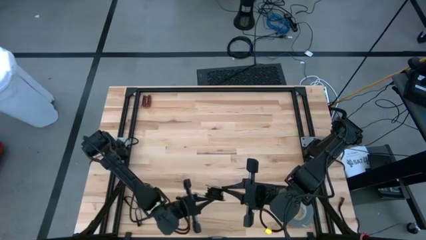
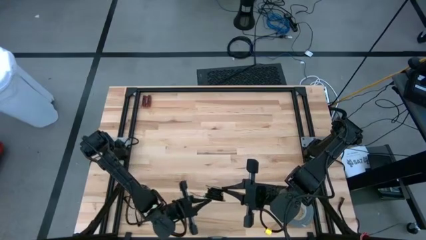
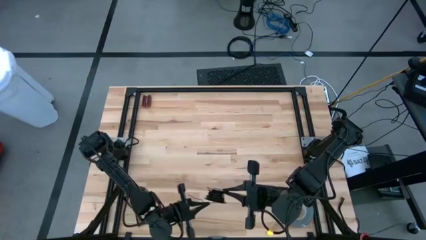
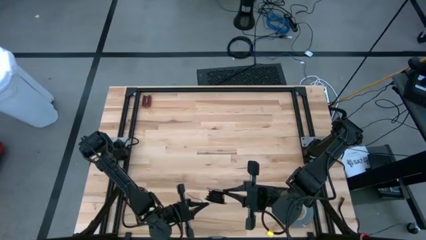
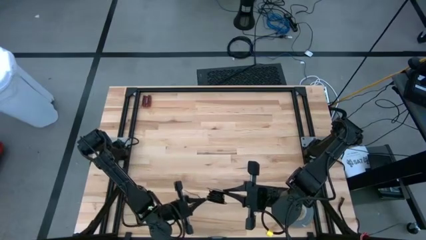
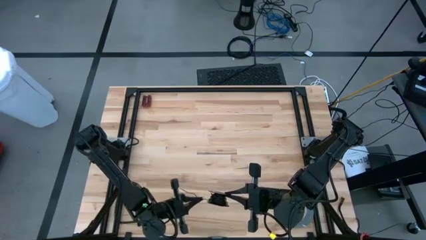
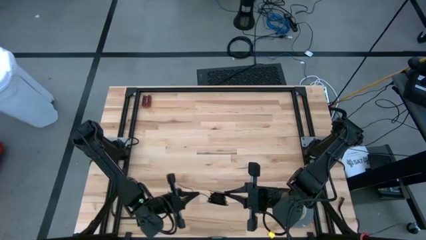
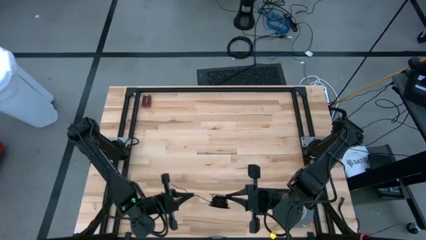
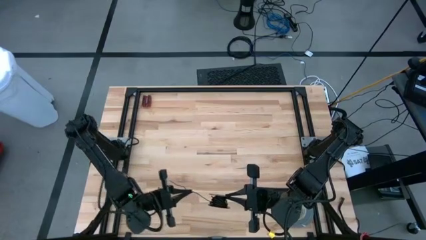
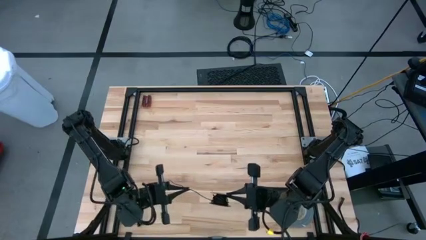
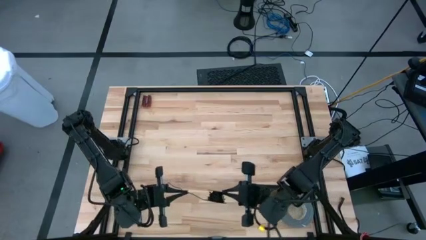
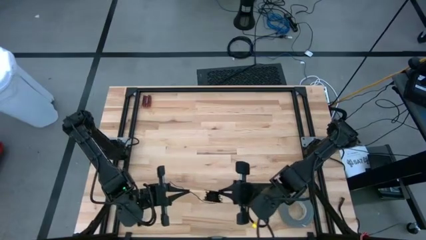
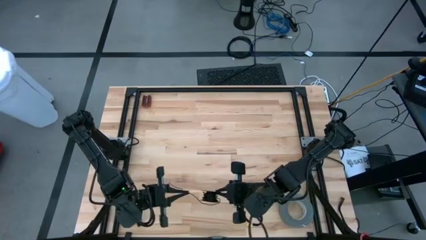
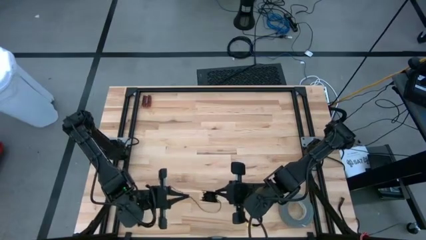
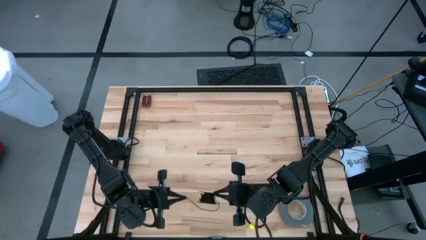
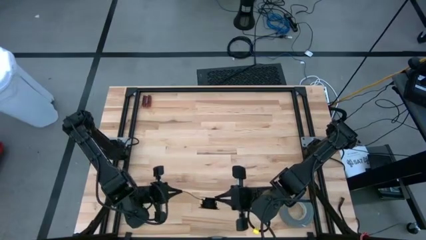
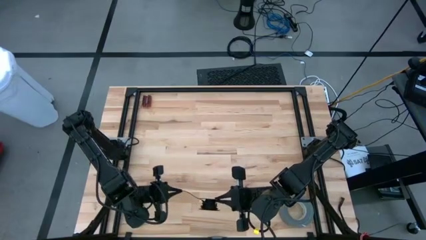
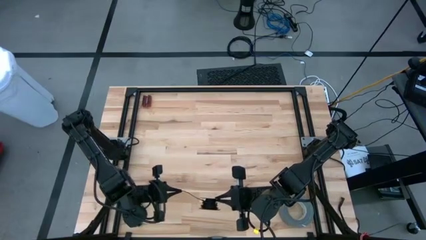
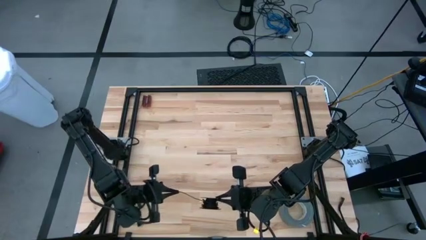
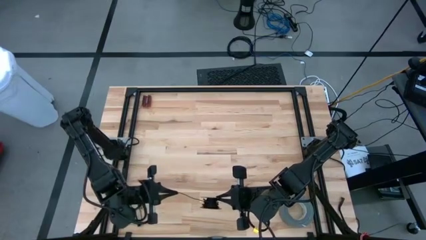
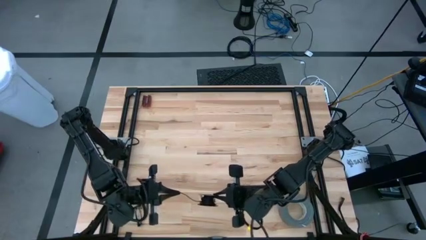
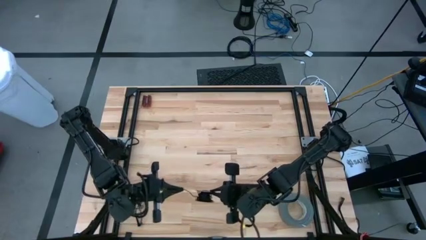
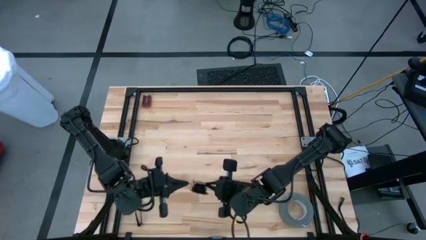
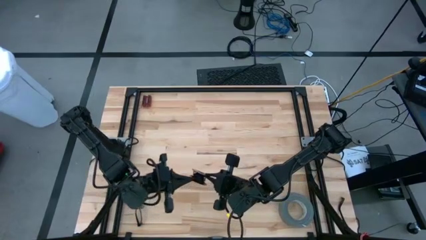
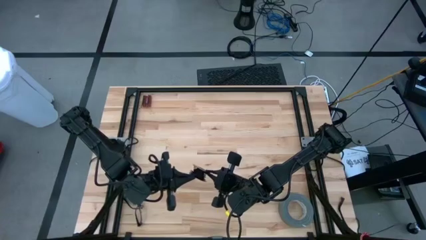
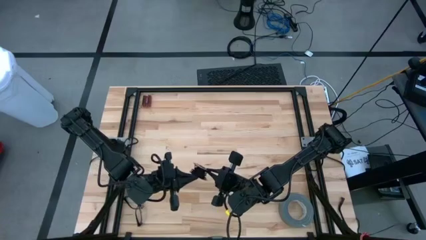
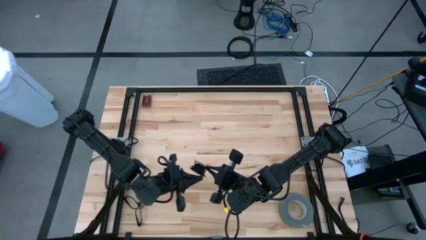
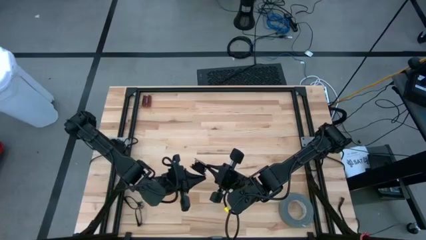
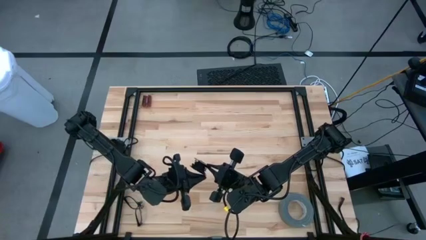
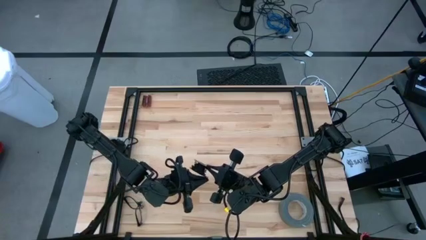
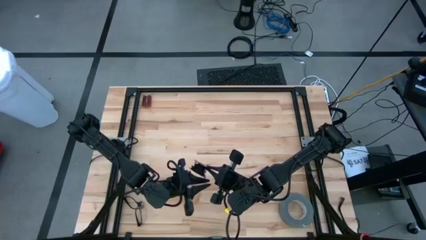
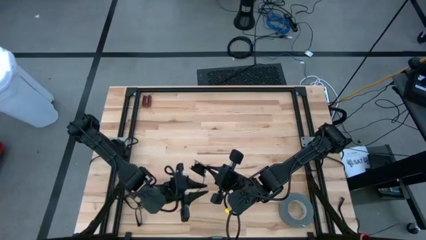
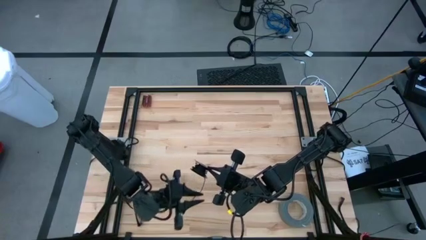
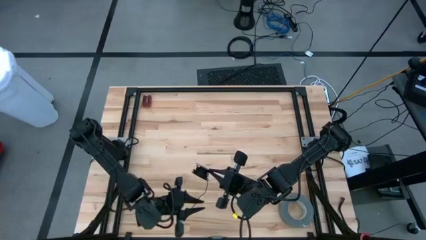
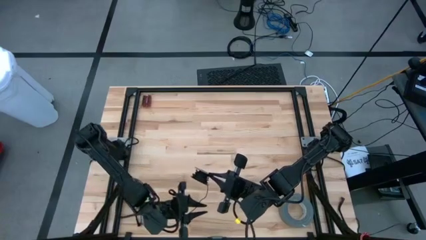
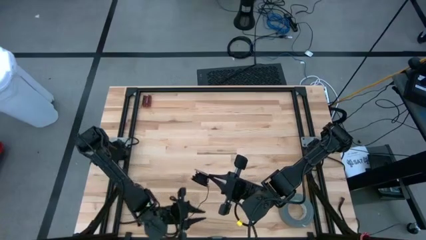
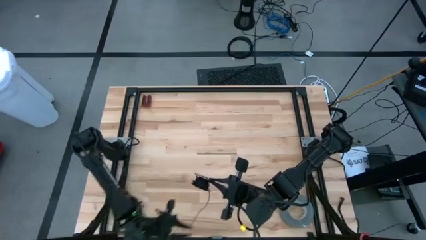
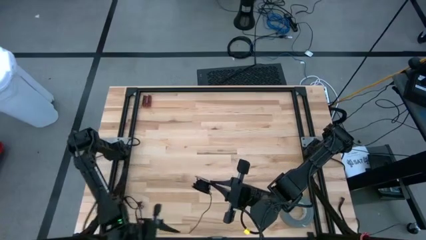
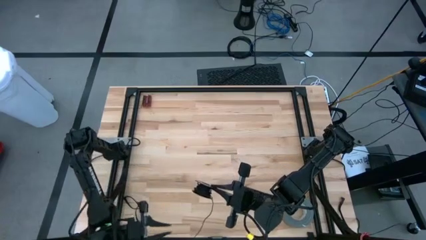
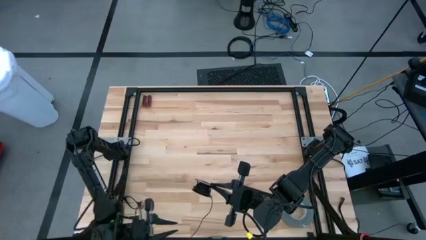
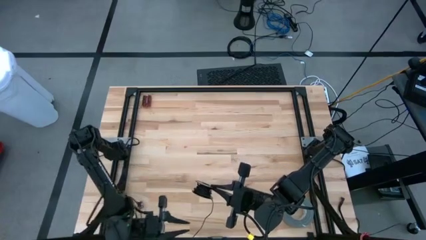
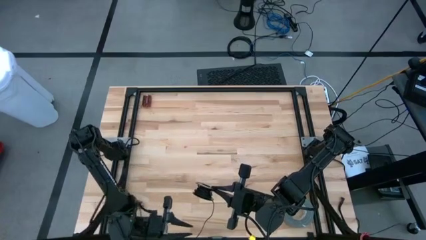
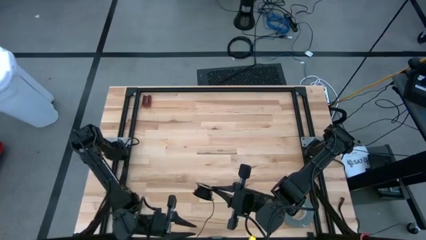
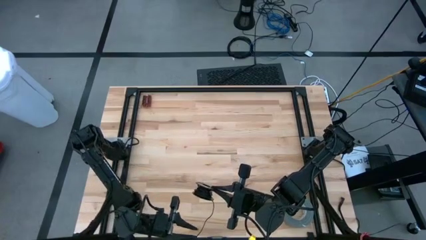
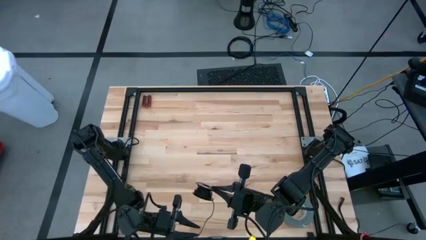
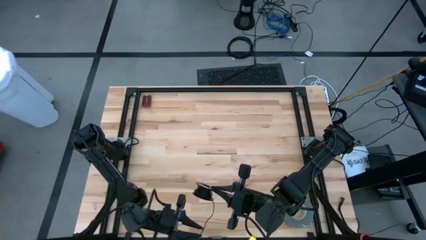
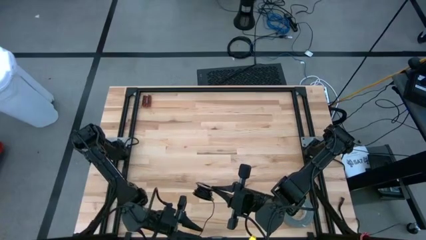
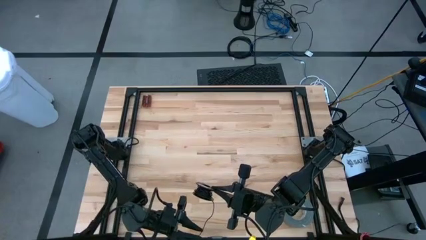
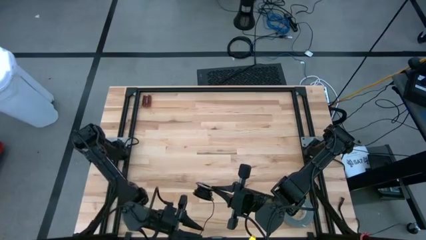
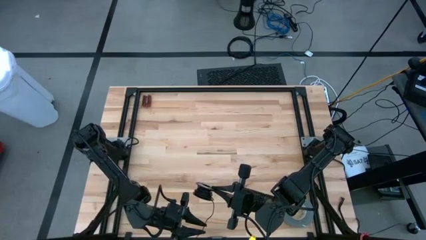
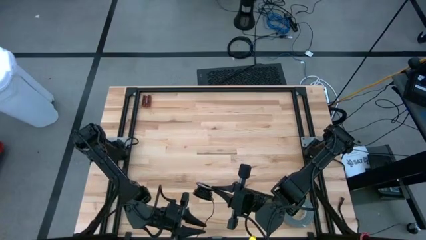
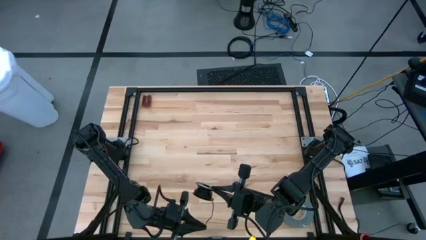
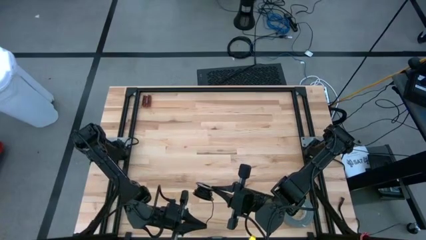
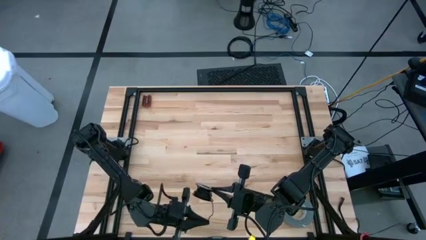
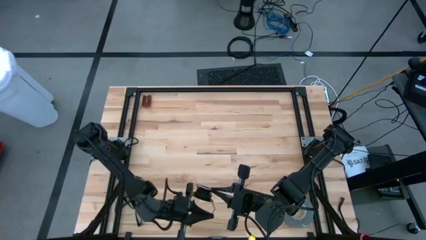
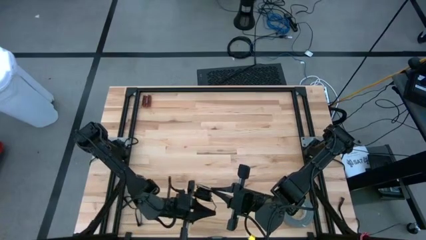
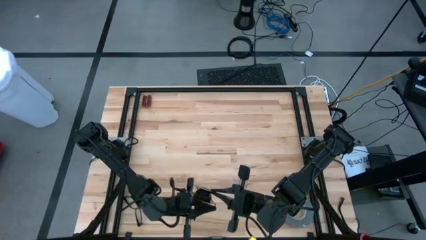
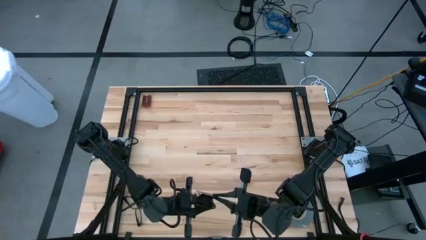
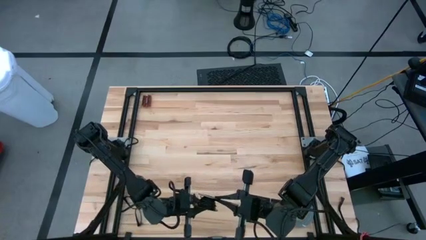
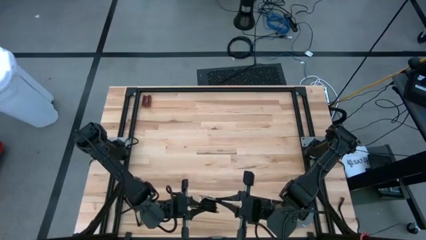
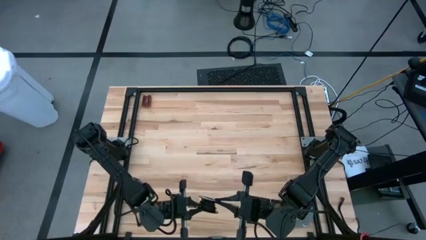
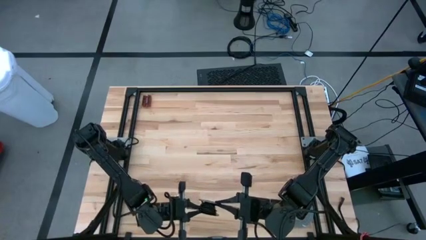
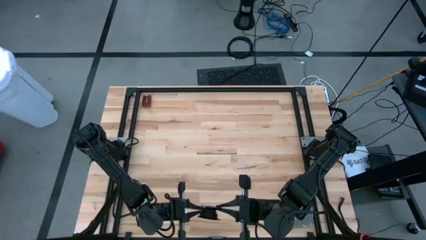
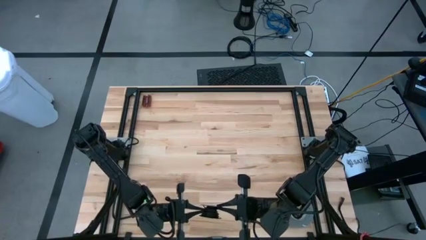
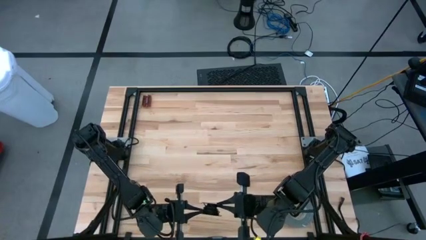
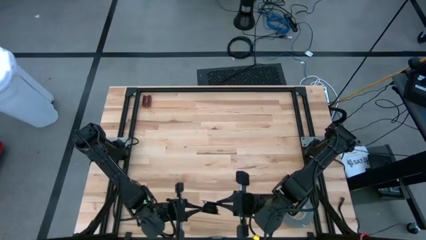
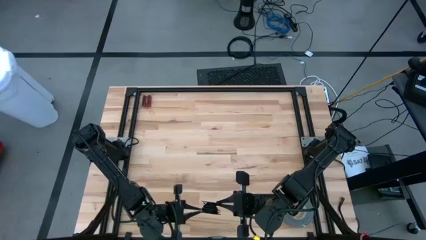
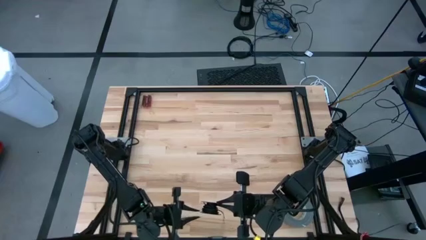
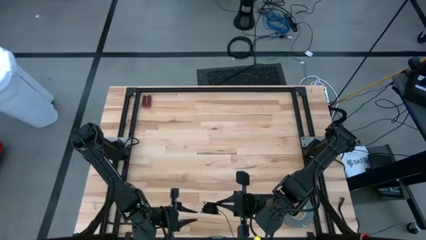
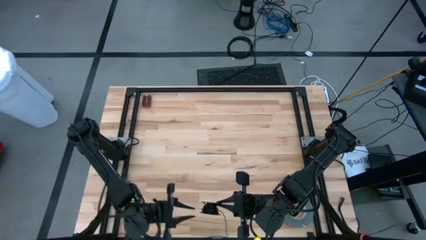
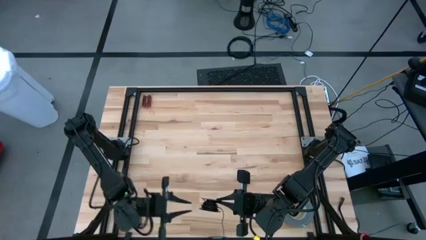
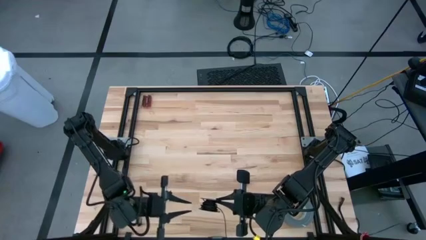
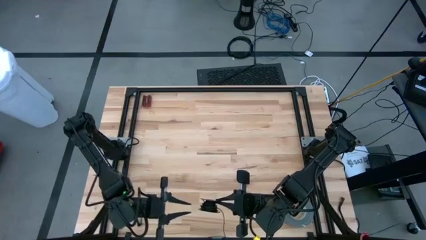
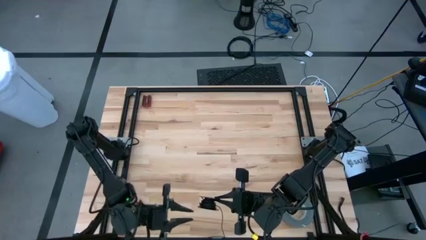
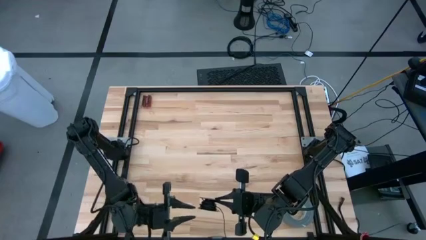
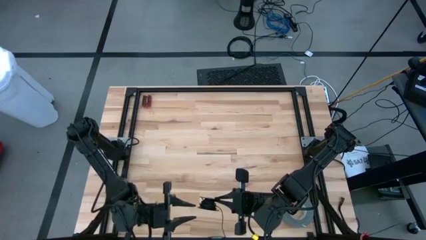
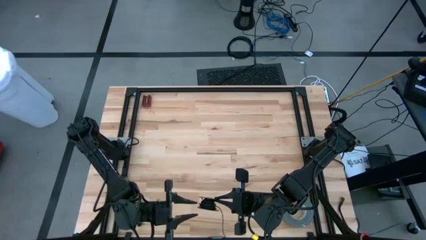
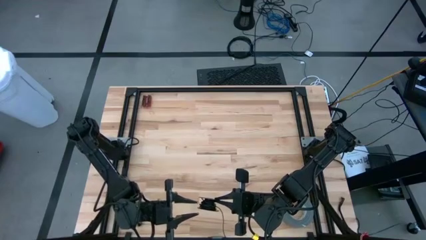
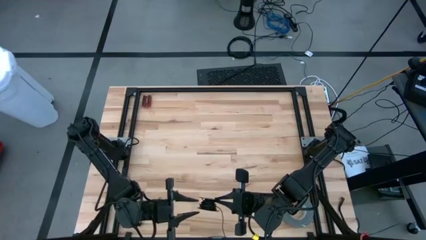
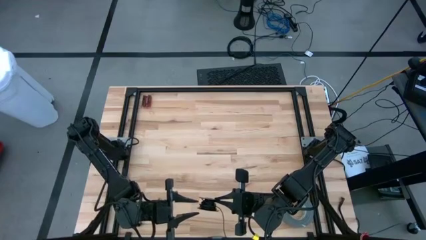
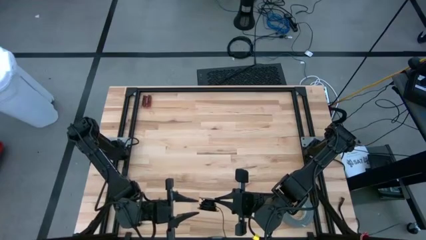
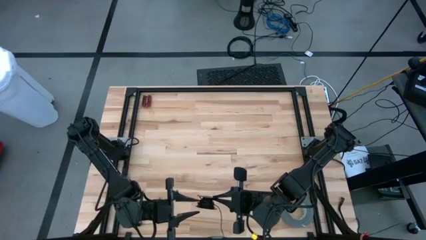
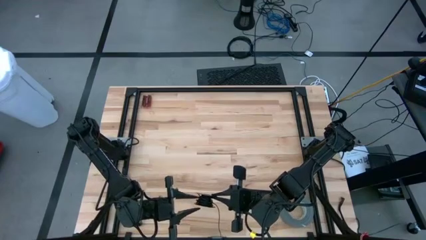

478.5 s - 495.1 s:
Task: Coil cords
Coil the black wire on the spool
